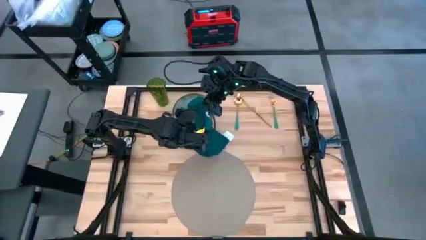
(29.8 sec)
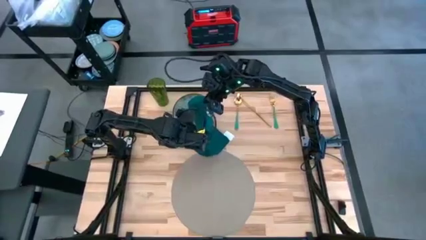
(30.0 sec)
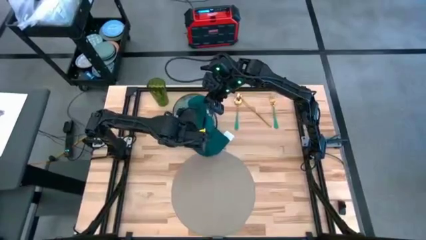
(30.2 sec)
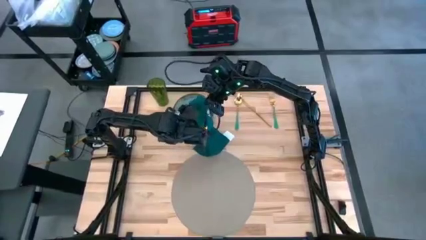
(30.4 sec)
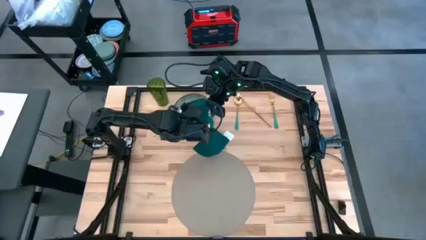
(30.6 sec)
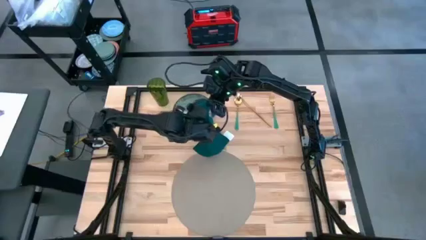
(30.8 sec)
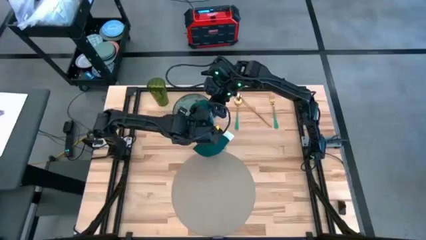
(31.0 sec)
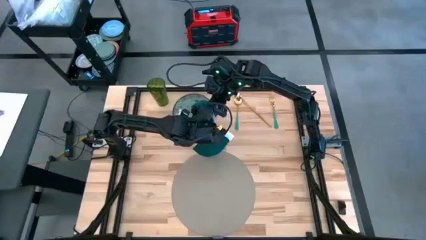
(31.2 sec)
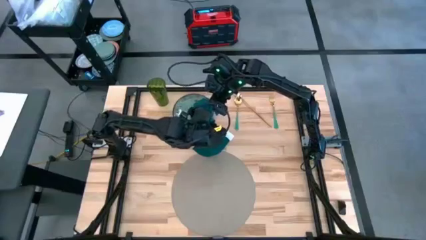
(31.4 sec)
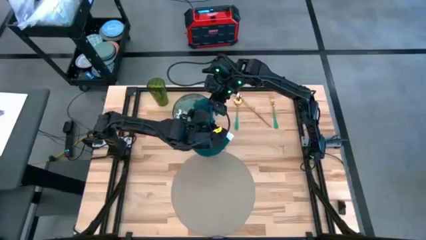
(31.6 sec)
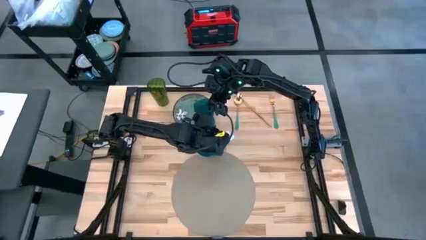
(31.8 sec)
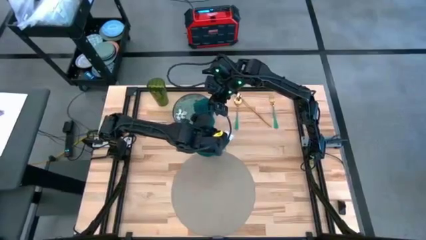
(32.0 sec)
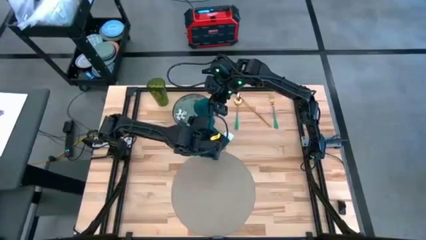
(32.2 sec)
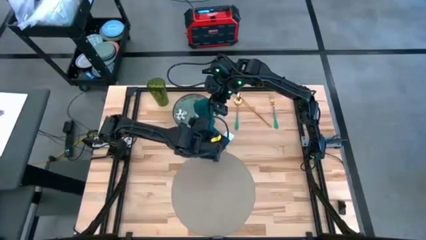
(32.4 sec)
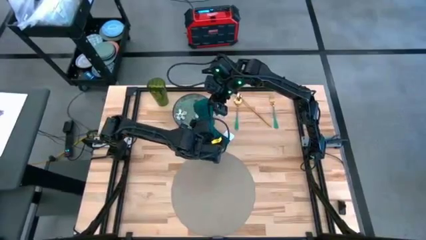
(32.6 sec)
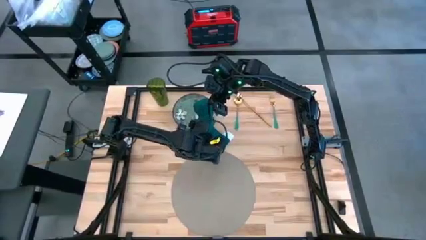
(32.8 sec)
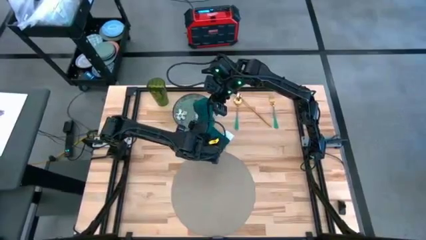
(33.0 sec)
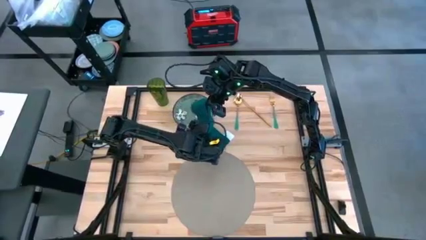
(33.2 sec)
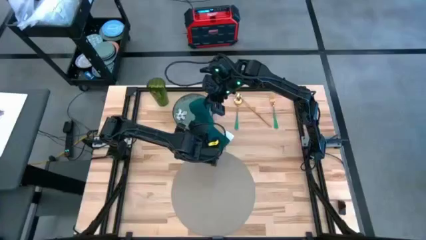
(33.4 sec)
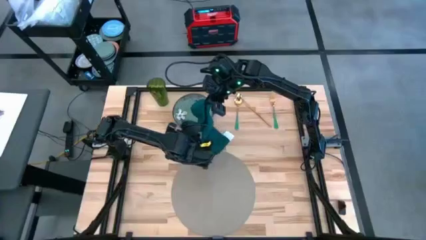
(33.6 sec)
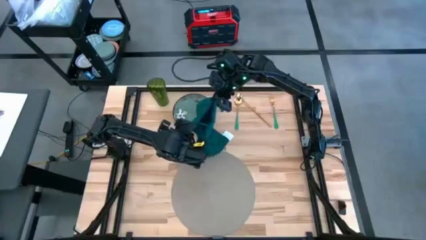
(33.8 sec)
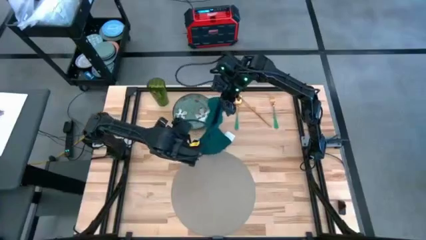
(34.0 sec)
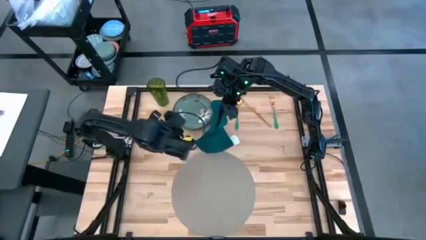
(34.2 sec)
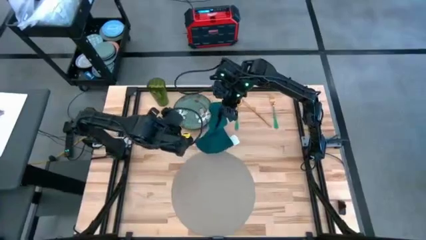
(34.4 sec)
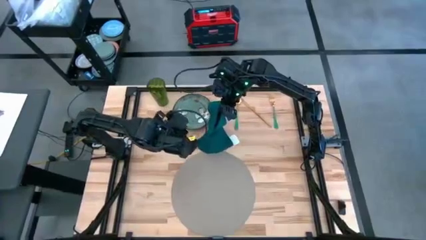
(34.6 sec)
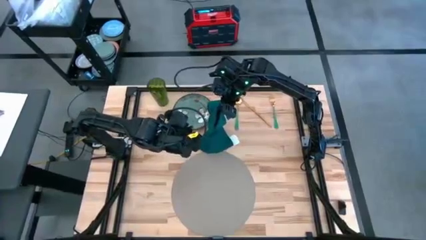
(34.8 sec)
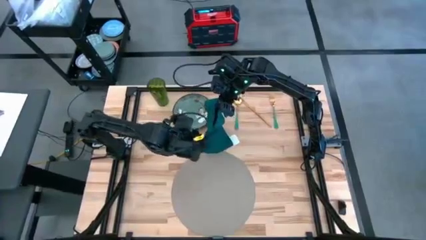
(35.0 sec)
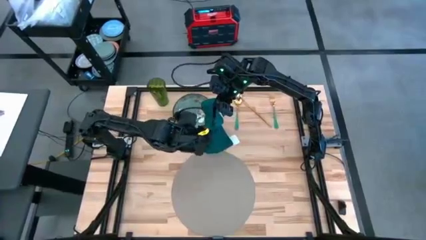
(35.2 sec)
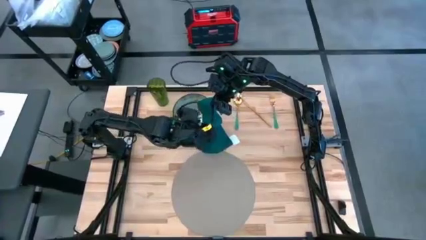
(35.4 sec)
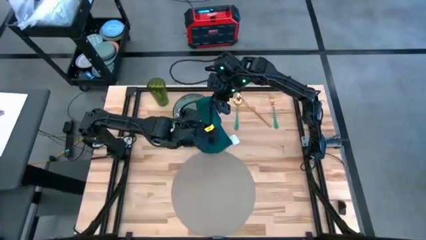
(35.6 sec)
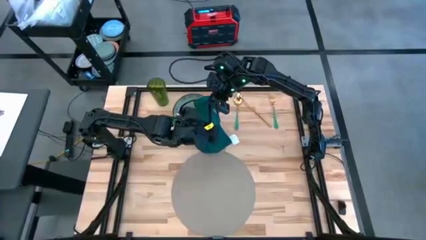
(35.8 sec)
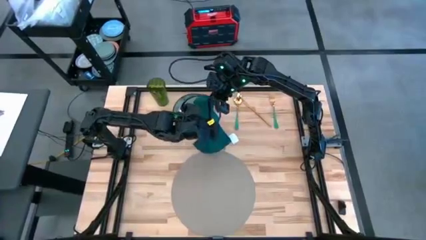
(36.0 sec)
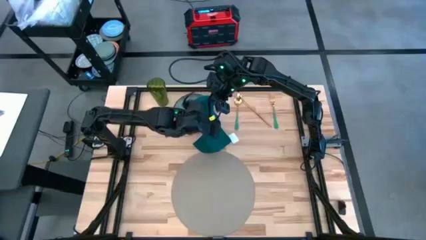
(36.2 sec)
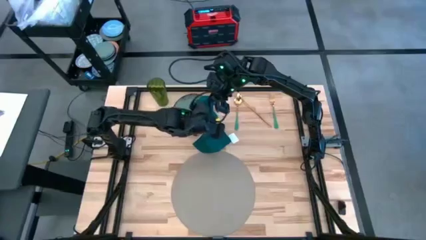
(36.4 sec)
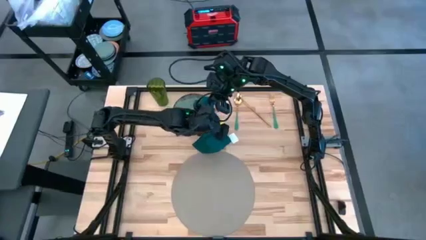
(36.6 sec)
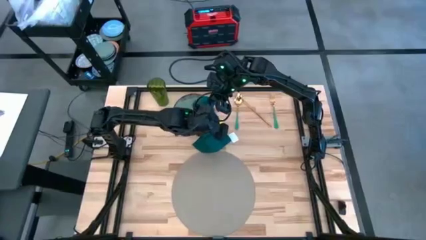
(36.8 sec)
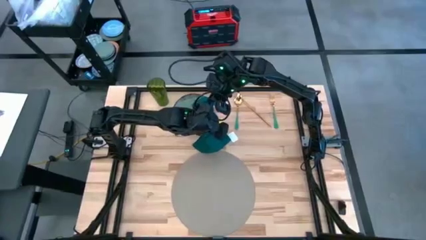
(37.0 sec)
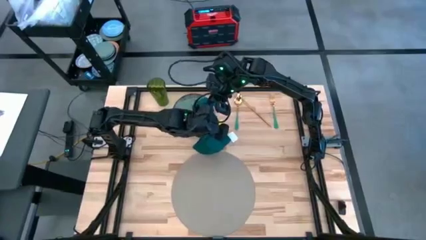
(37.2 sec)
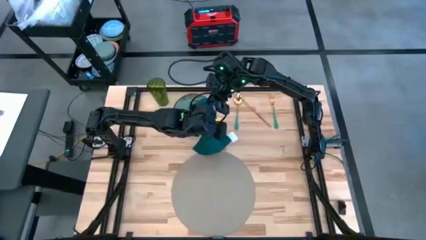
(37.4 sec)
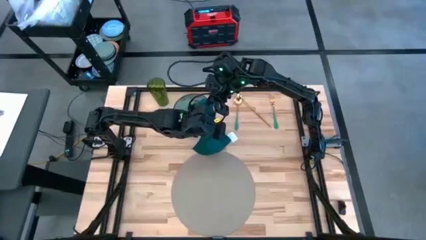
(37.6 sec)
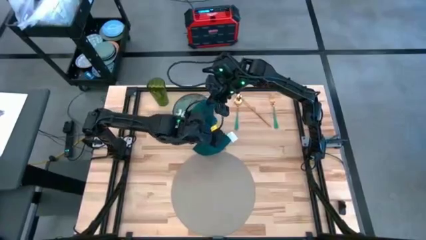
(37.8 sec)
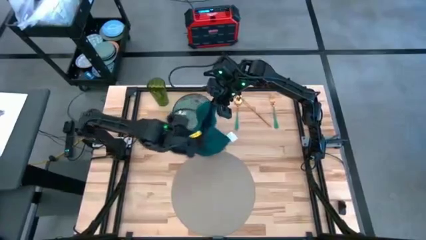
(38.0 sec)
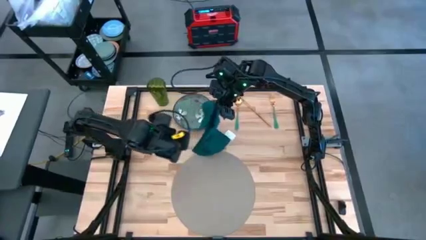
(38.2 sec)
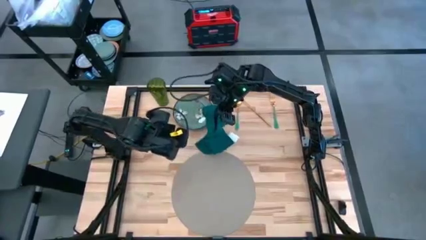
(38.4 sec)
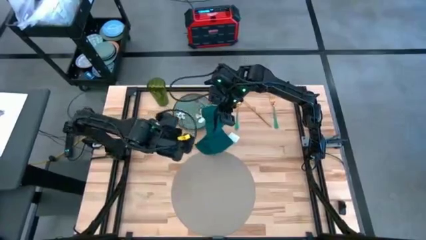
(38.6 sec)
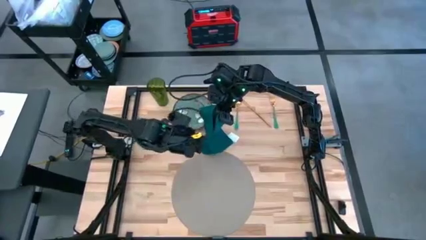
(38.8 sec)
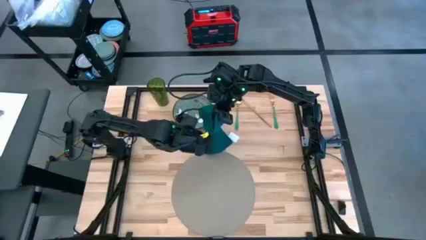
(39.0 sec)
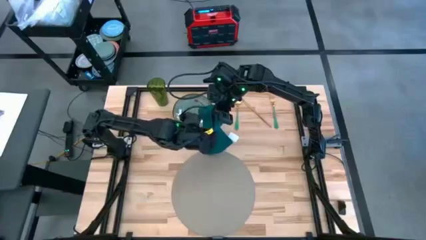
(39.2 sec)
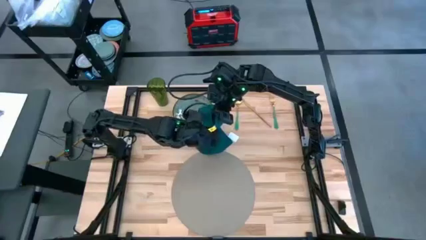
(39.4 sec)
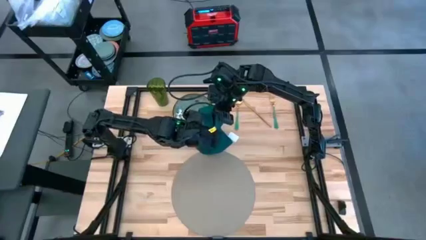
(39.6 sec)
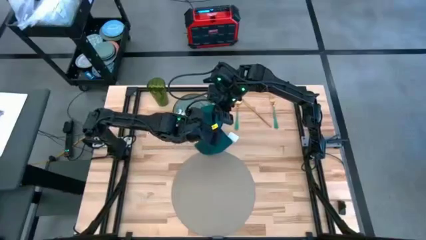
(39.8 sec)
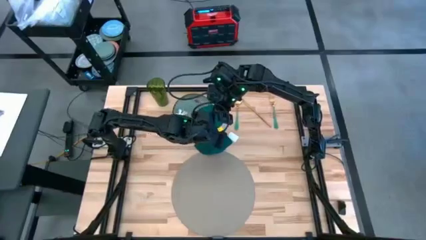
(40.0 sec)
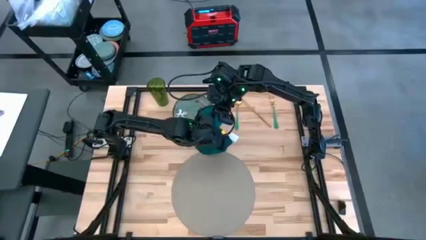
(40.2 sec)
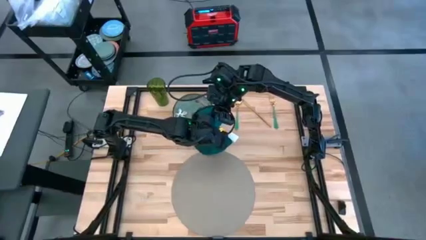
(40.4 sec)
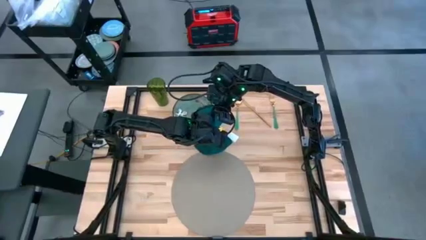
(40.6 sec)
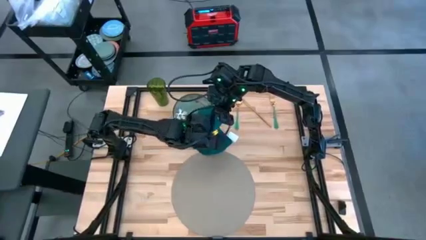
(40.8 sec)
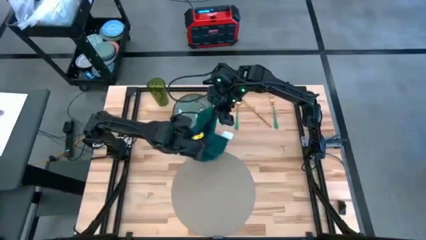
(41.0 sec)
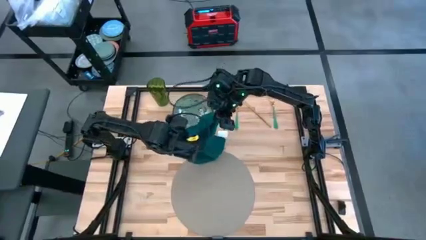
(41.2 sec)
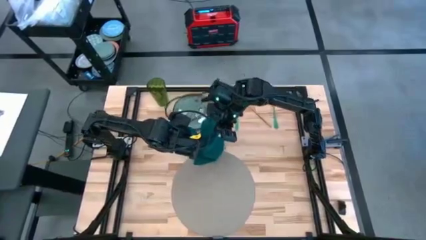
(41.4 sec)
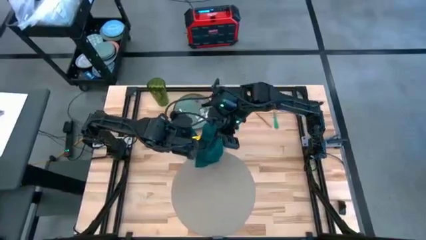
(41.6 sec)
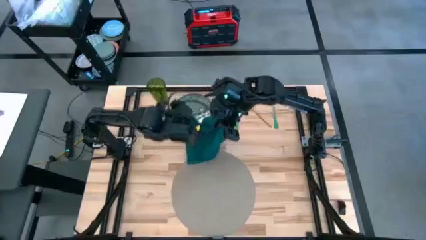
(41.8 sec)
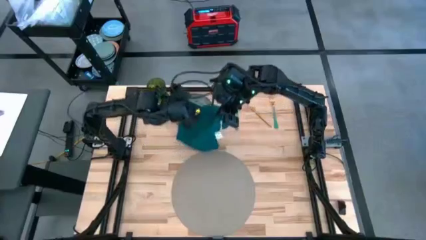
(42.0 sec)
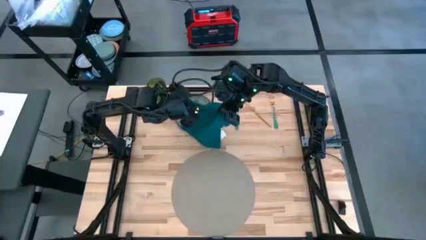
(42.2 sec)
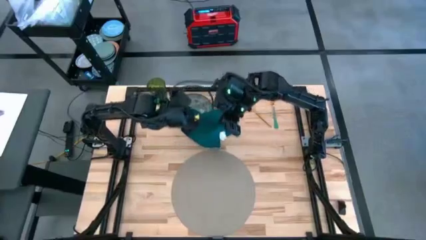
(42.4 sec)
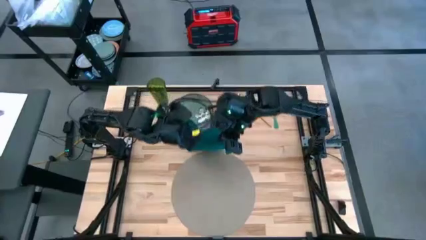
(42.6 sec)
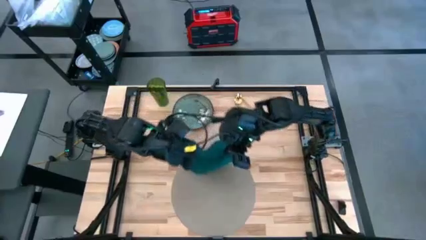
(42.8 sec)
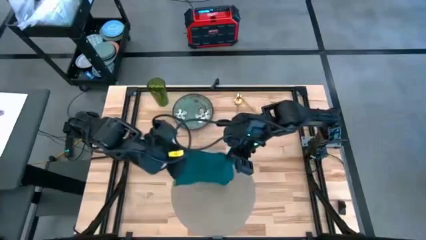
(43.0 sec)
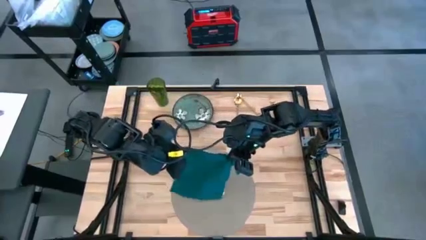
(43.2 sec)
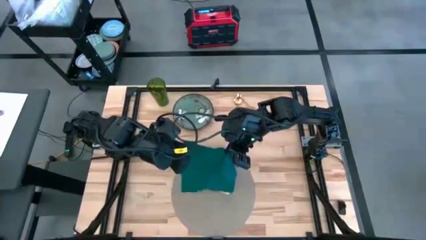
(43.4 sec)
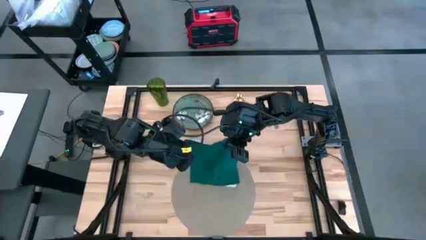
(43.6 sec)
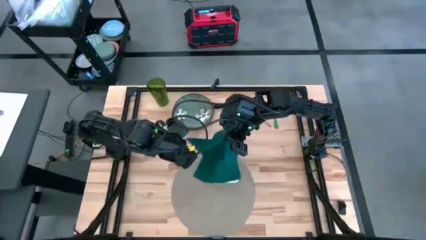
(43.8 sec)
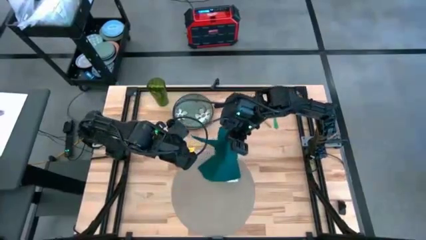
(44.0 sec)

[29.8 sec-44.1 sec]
Task: Set table place
Fold the green napkin
